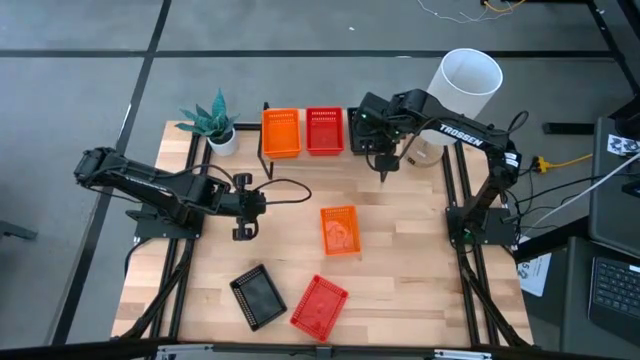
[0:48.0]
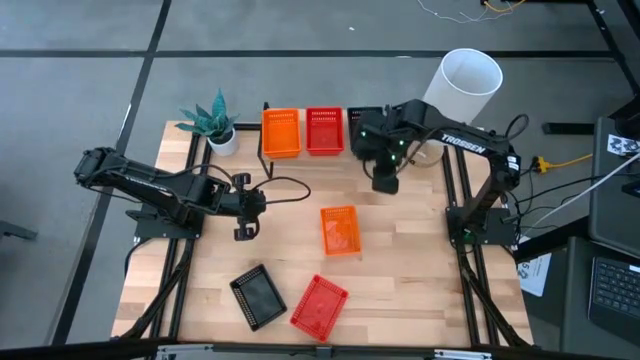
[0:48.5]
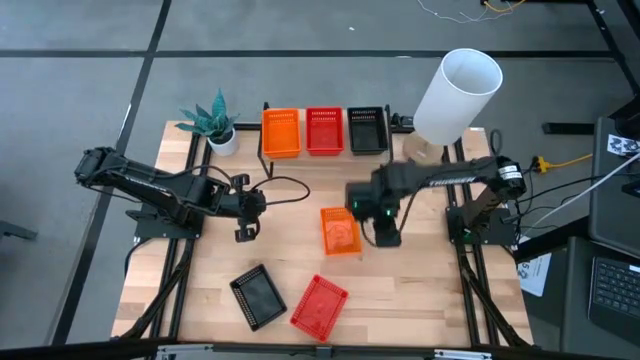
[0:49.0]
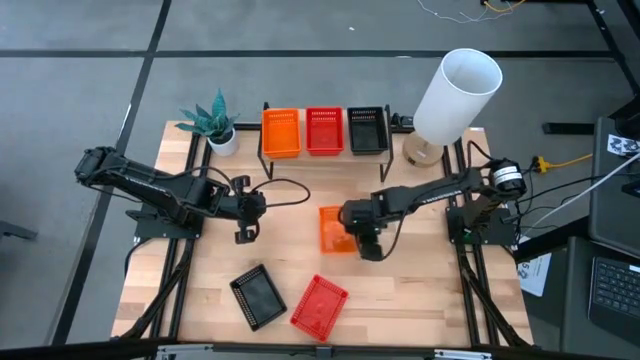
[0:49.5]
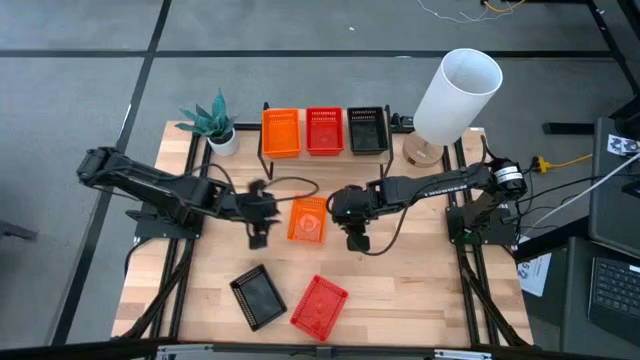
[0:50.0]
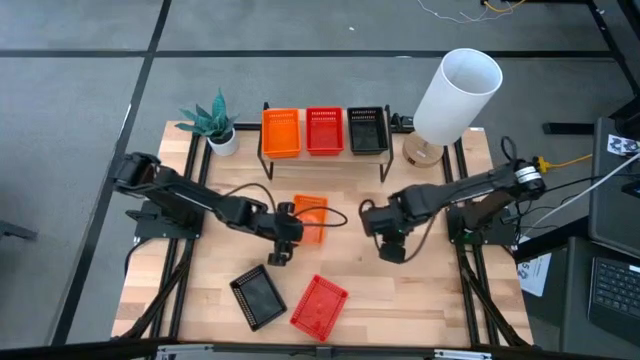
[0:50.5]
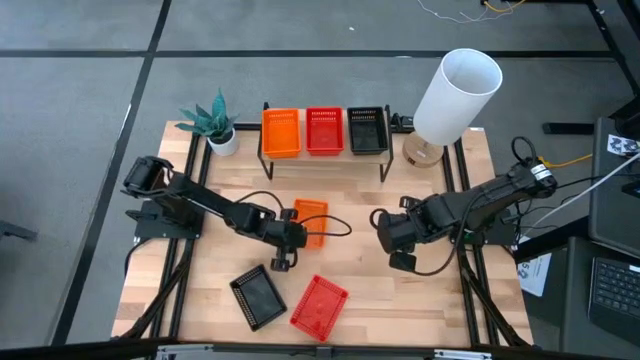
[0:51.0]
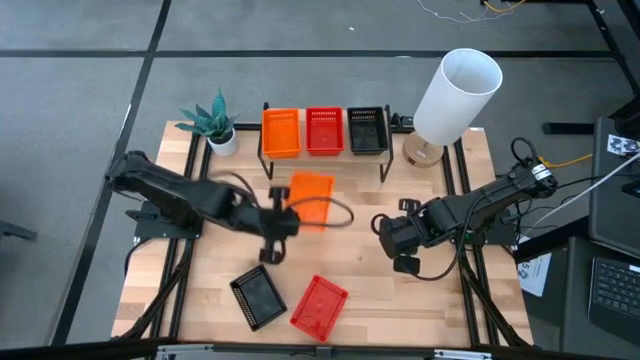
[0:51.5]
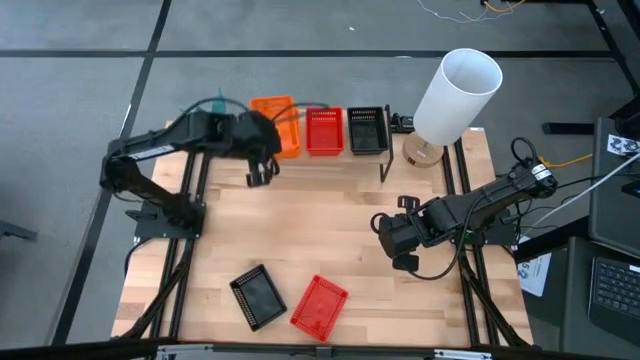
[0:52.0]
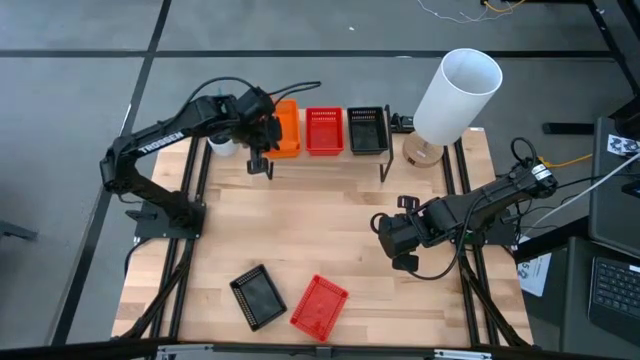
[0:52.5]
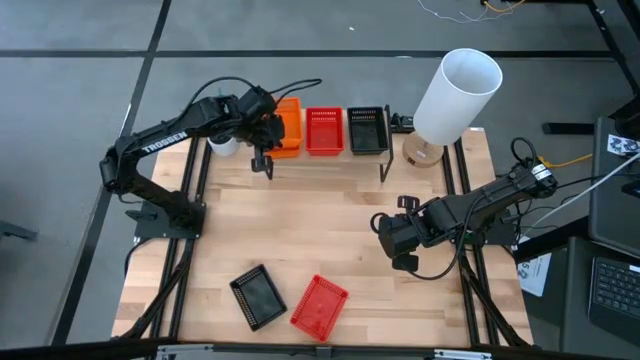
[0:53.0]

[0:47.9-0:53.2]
Task: Stack baskets on shelf by color
Stack the orange bin on the orange bin on the shelf

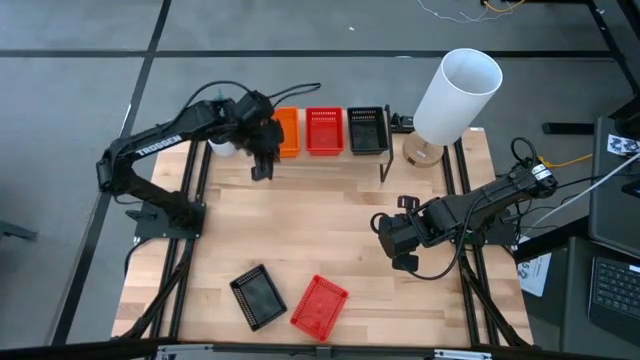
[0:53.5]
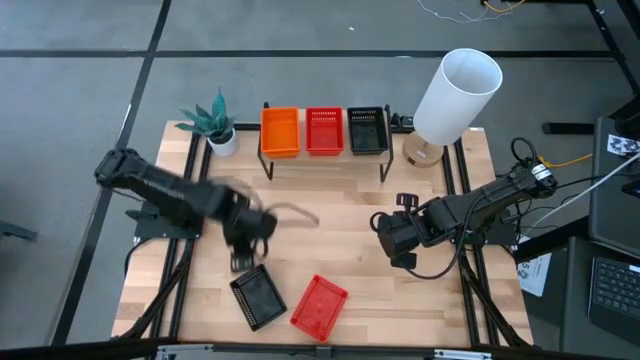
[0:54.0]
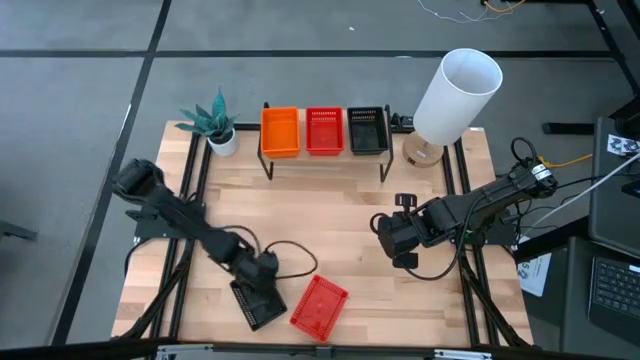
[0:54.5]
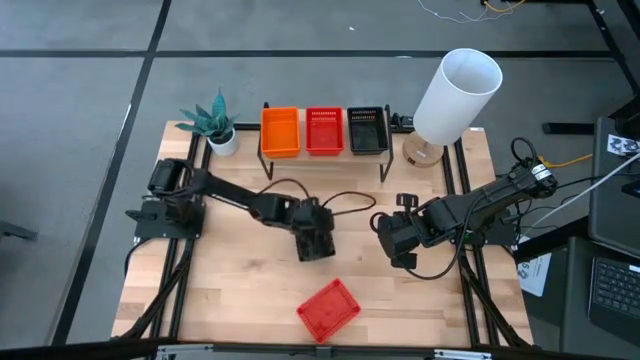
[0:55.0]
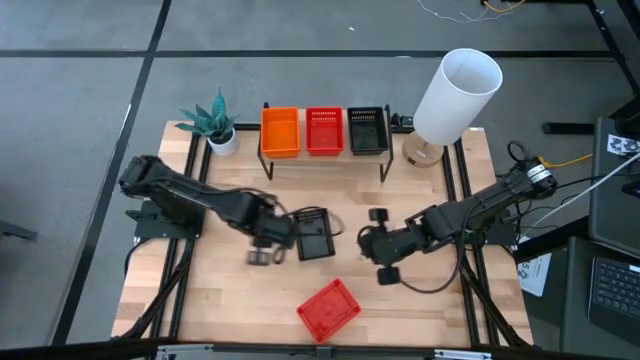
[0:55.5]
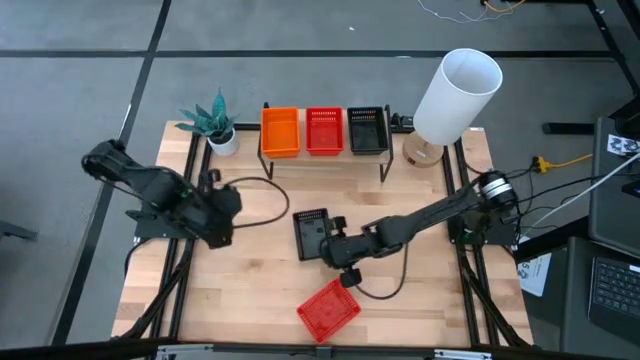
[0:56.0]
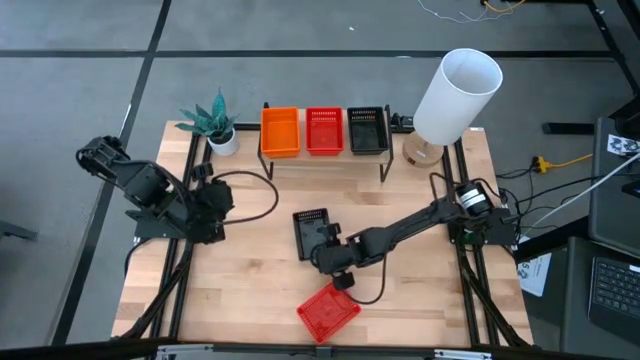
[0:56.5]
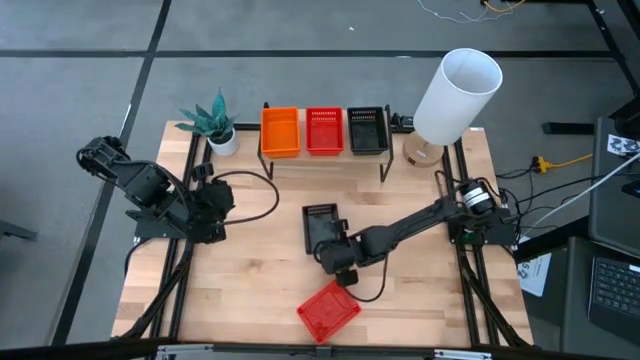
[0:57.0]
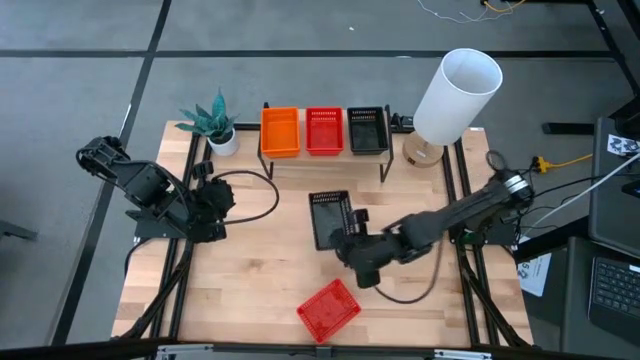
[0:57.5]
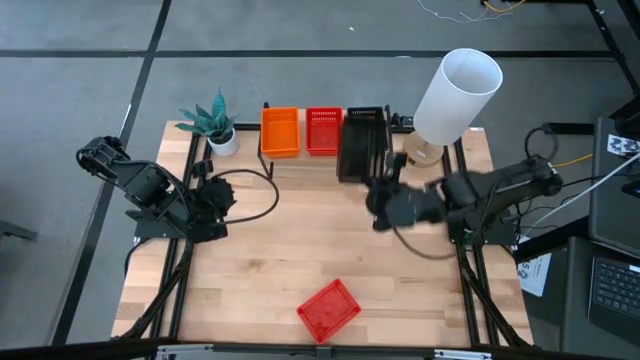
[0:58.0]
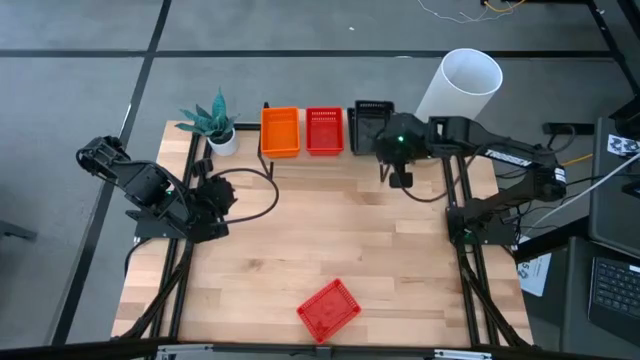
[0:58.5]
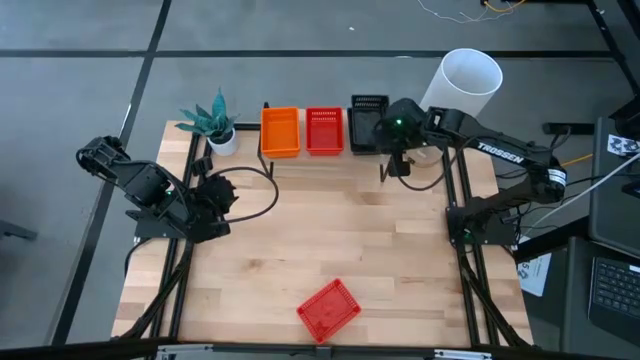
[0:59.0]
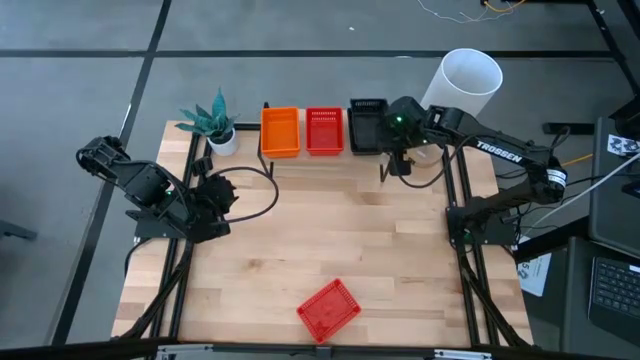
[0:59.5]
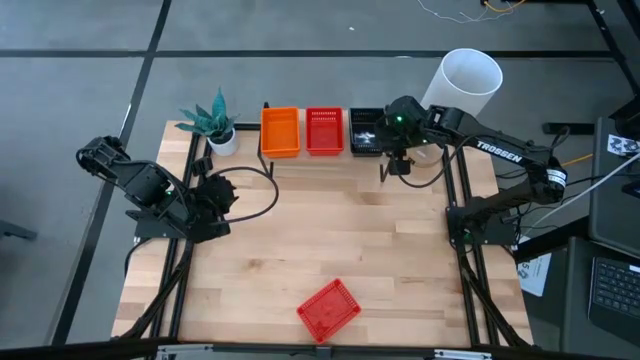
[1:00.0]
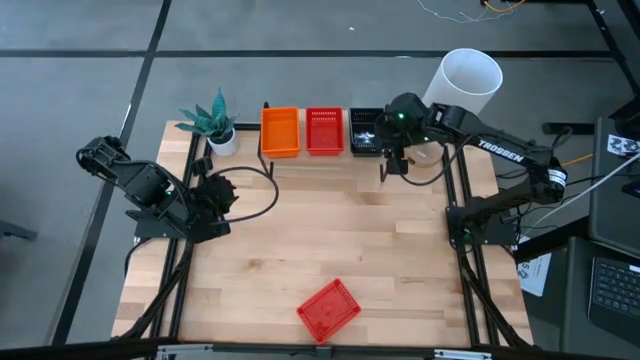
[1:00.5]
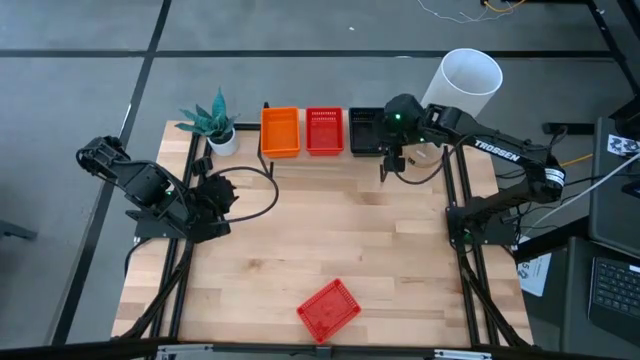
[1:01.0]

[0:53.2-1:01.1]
Stack the black bin on the black bin on the shelf

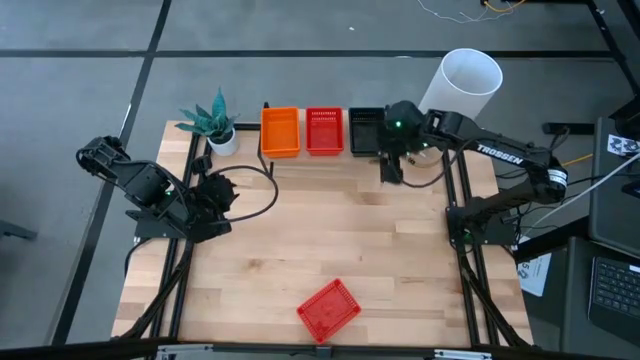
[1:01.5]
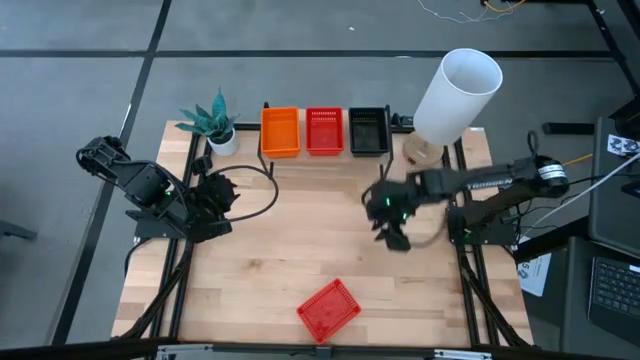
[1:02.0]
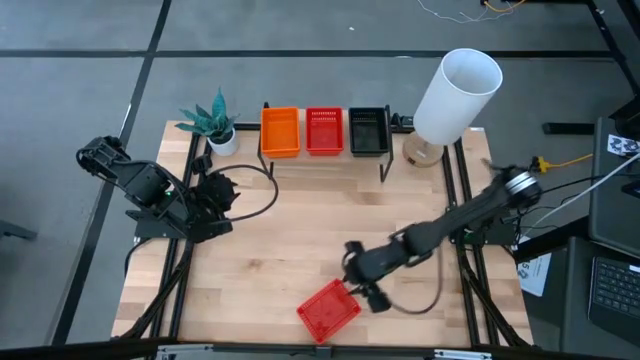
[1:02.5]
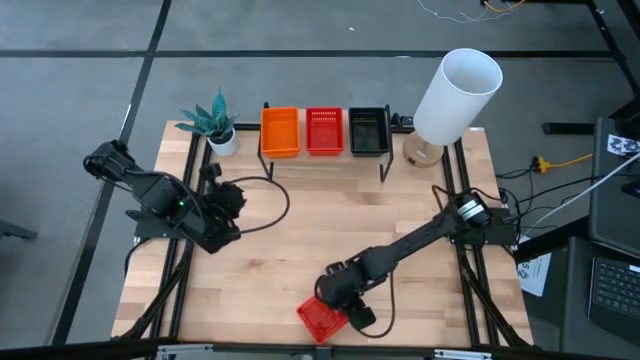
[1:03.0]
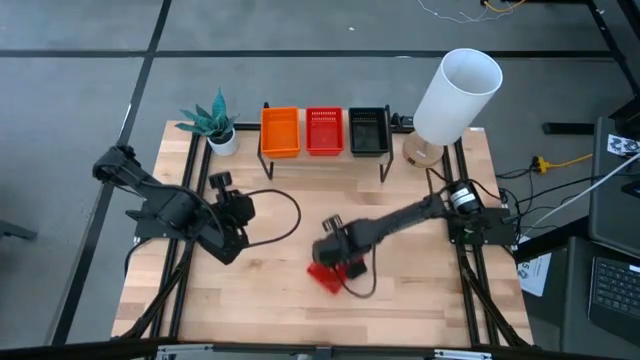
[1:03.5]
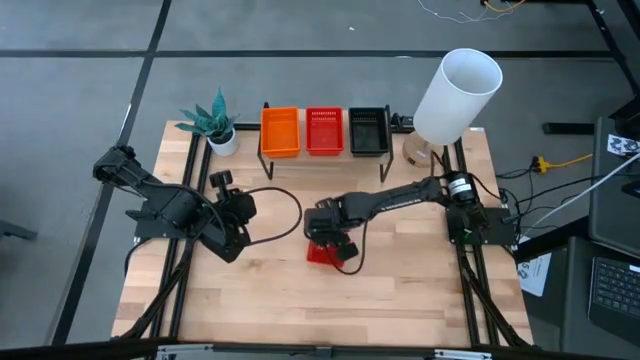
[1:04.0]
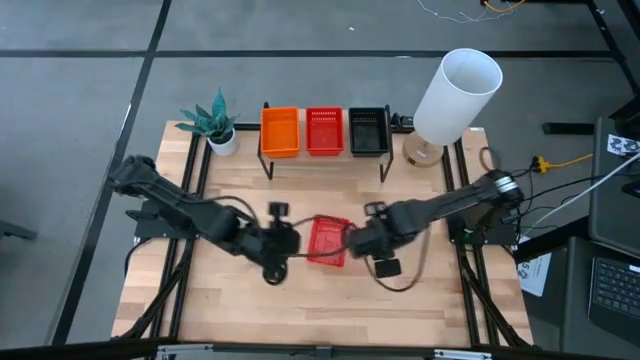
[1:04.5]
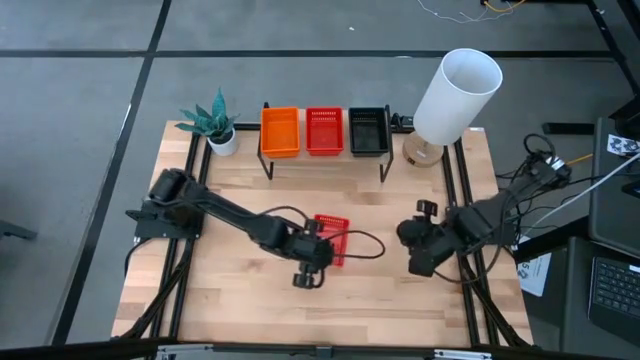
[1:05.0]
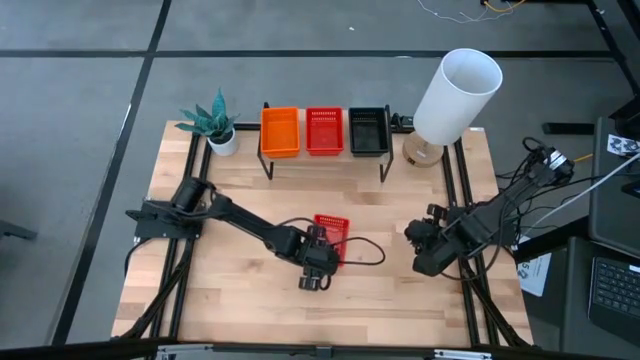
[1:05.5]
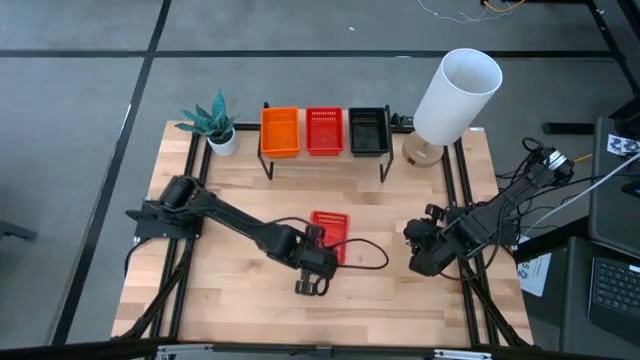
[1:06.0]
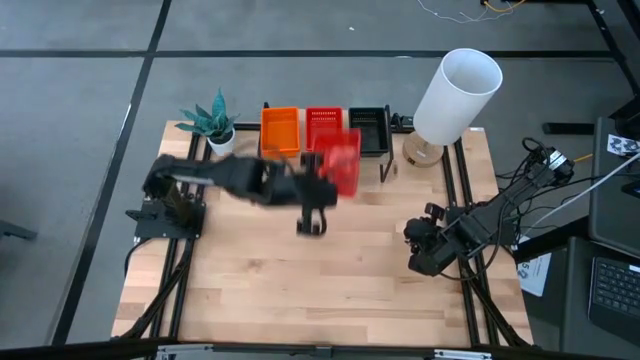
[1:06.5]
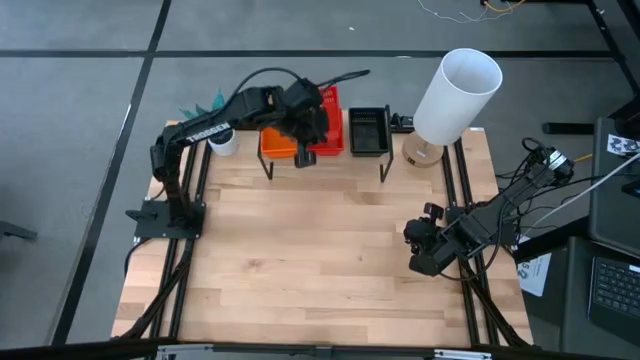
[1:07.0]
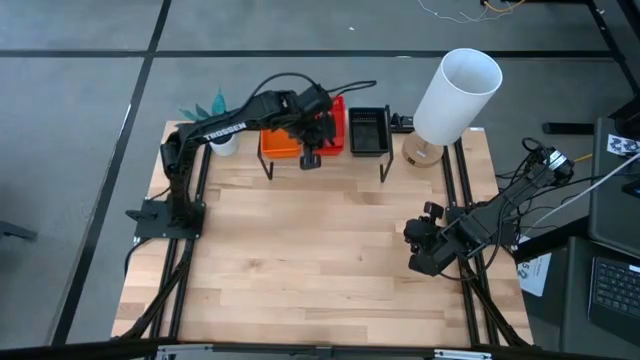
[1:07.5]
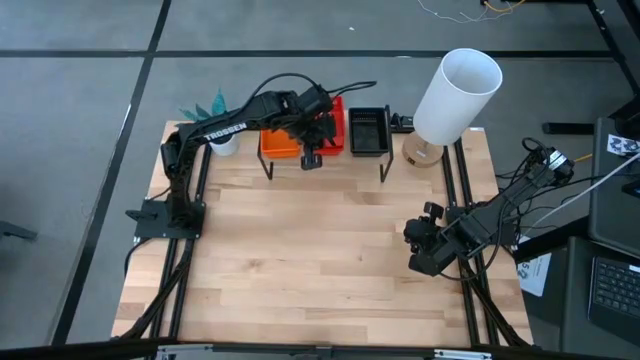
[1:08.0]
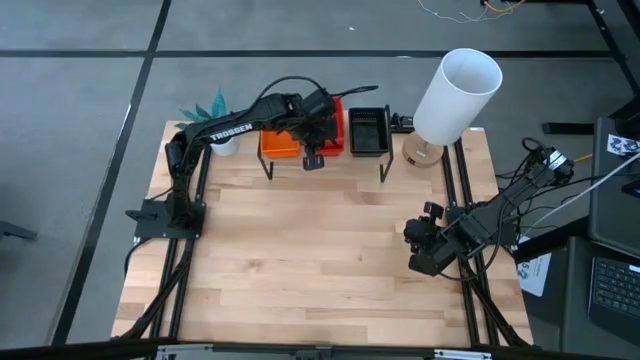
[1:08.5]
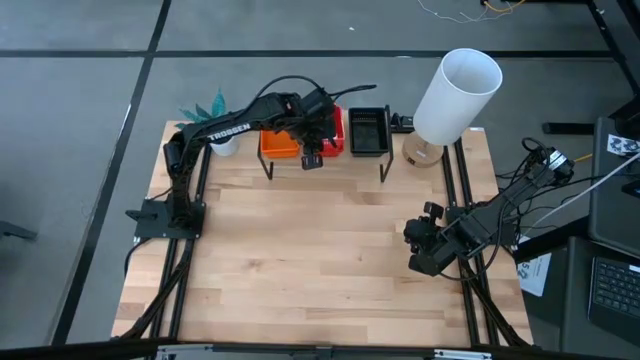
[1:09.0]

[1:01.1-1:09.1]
Stack the red bin on the red bin on the shelf

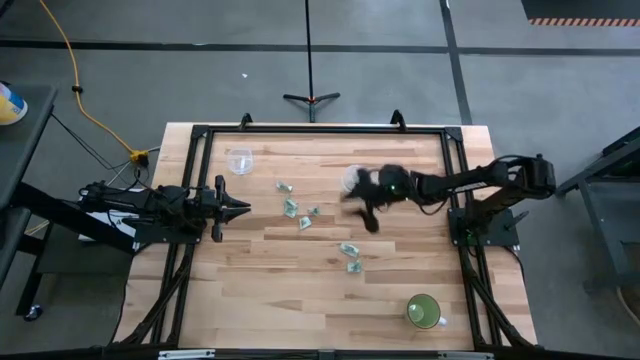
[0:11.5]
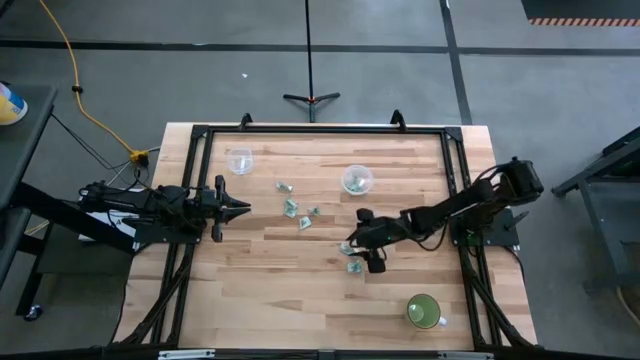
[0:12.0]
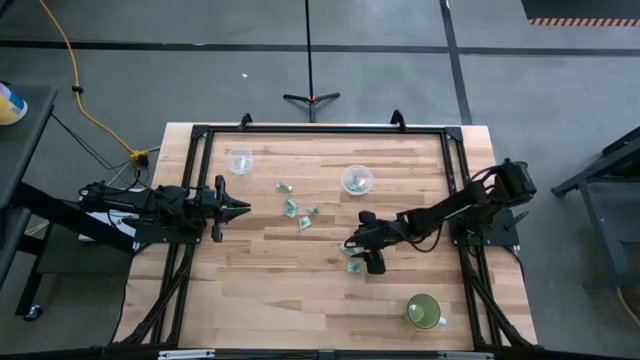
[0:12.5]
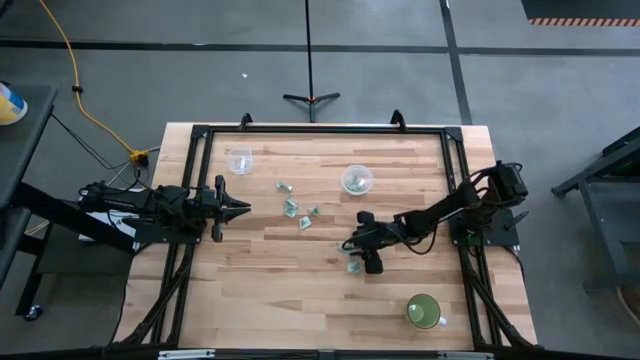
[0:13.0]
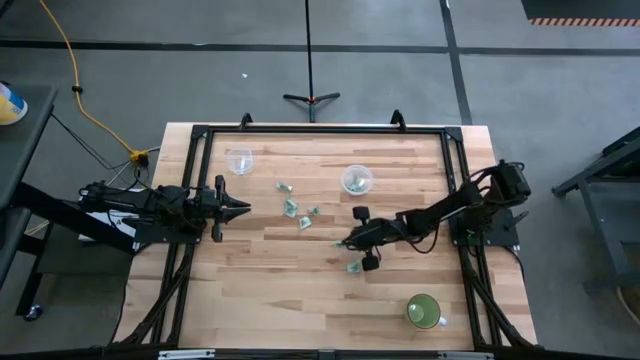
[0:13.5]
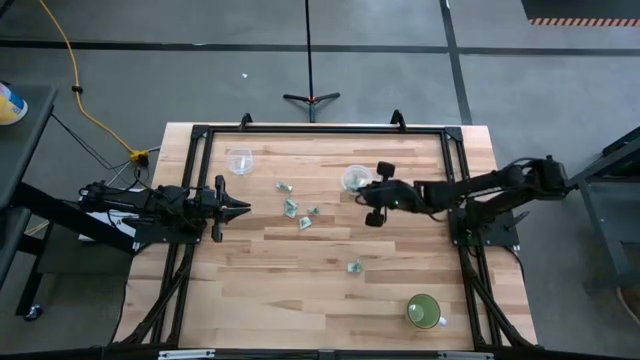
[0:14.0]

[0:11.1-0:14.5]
Task: Pick and place Stevia / Truvia into bins
Put the stevia packet into the bottom transparent container
